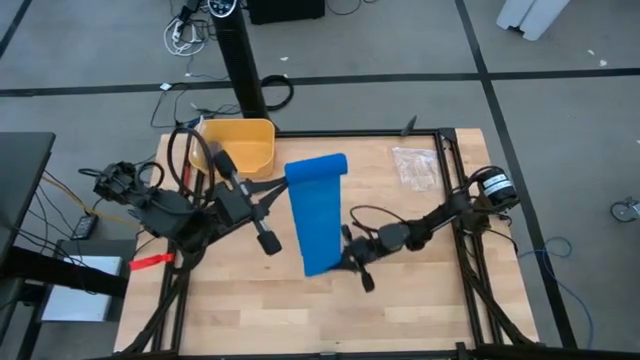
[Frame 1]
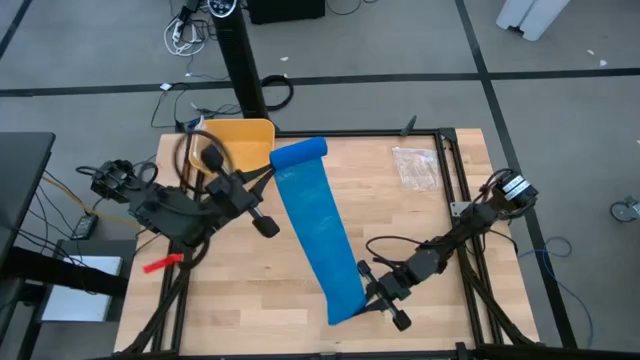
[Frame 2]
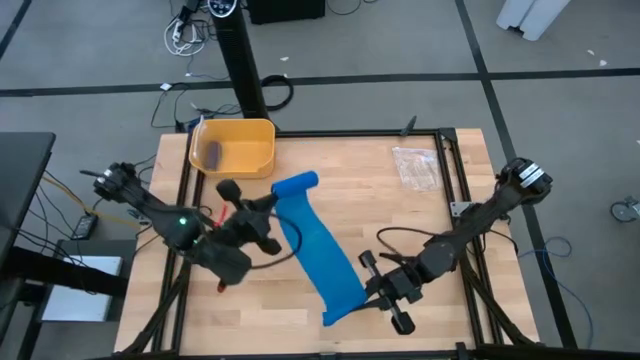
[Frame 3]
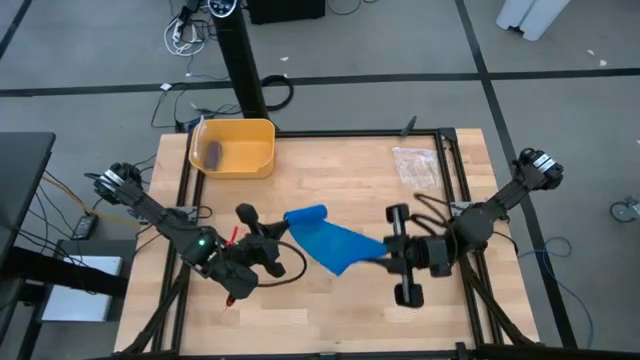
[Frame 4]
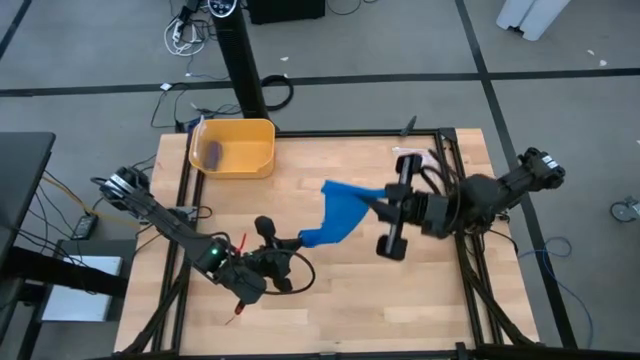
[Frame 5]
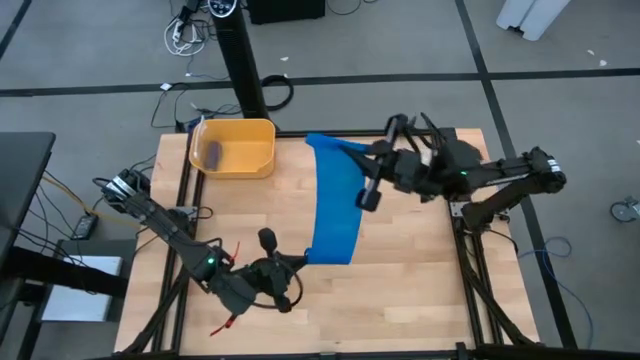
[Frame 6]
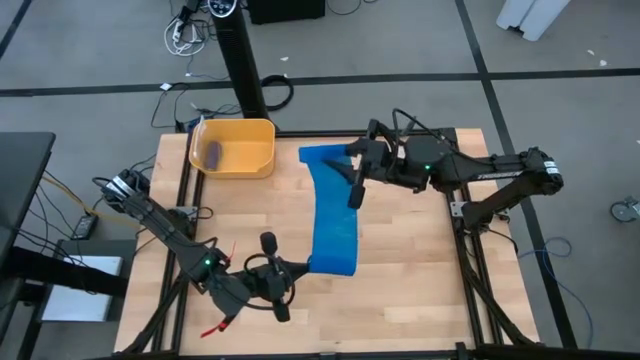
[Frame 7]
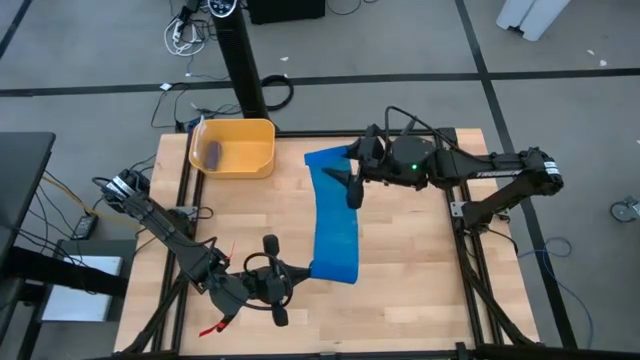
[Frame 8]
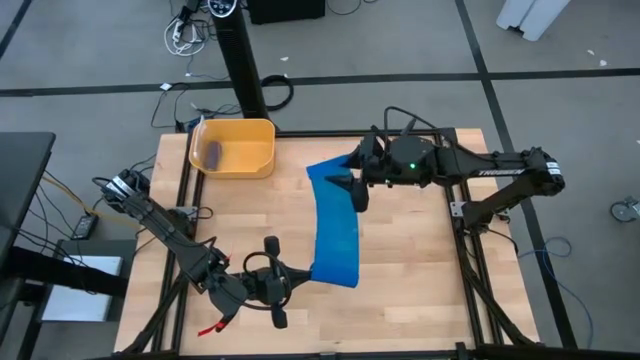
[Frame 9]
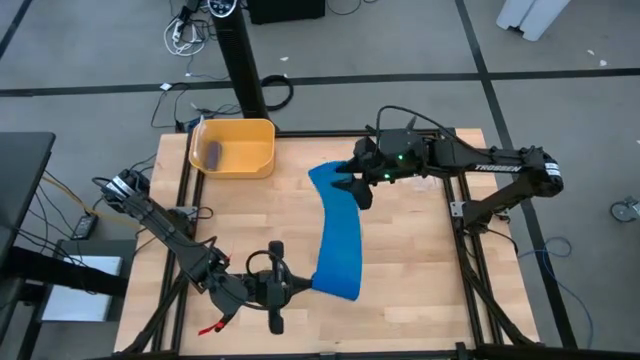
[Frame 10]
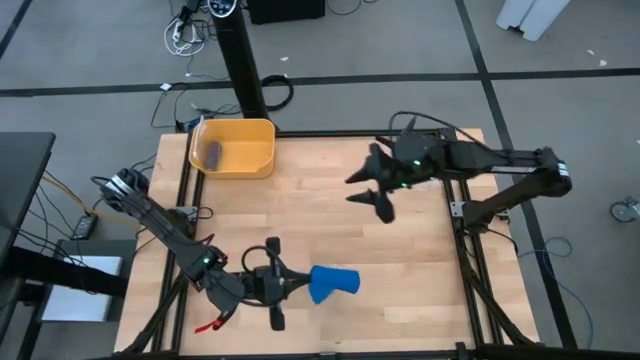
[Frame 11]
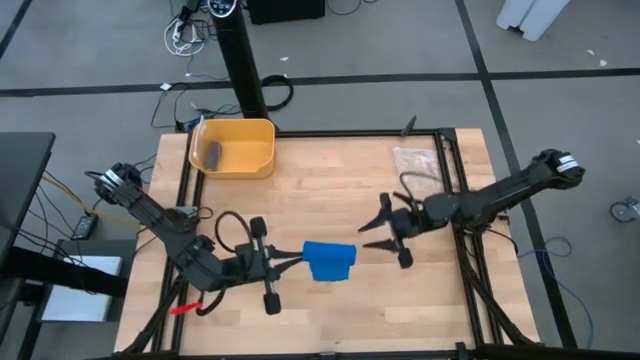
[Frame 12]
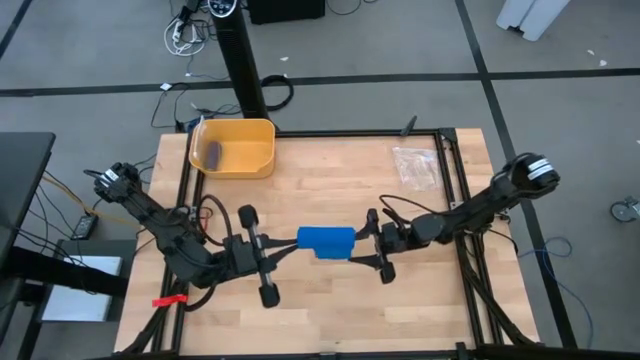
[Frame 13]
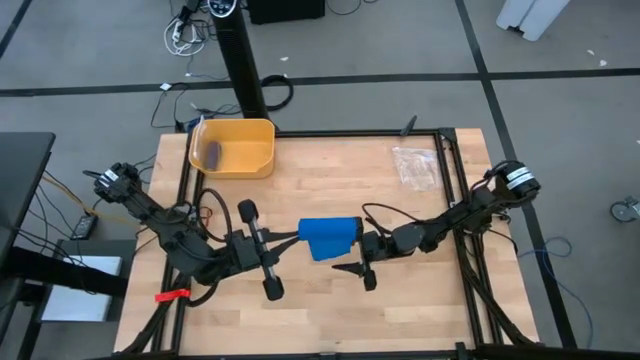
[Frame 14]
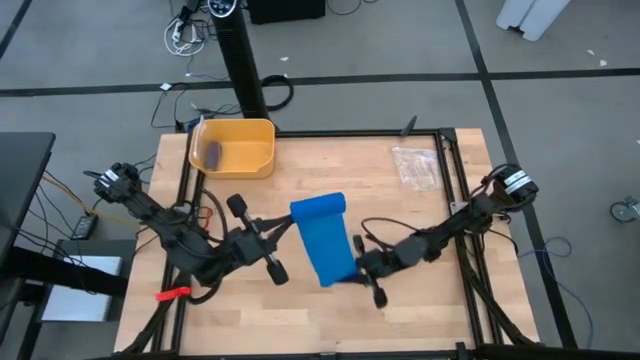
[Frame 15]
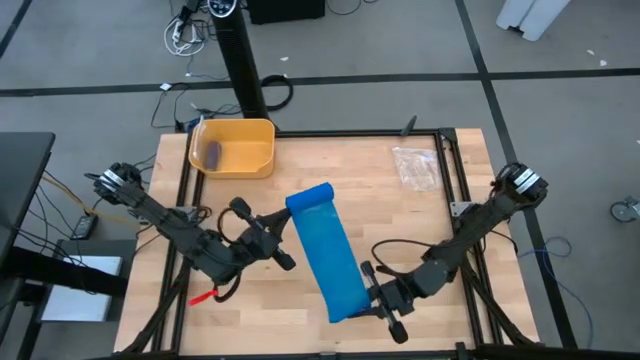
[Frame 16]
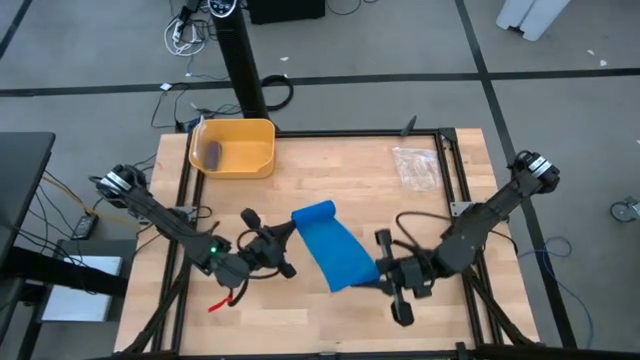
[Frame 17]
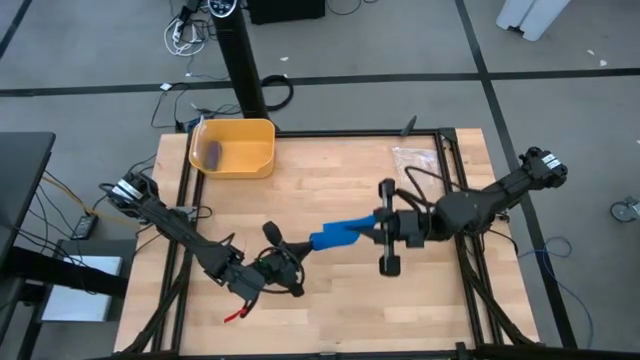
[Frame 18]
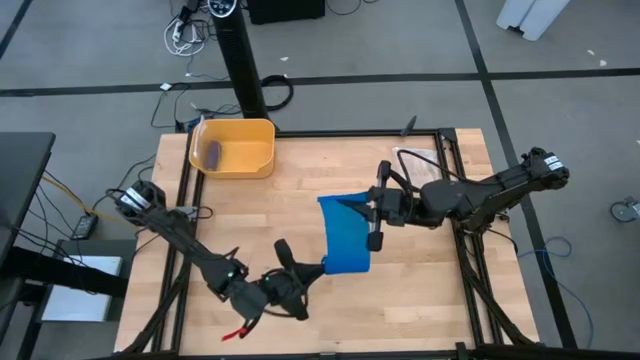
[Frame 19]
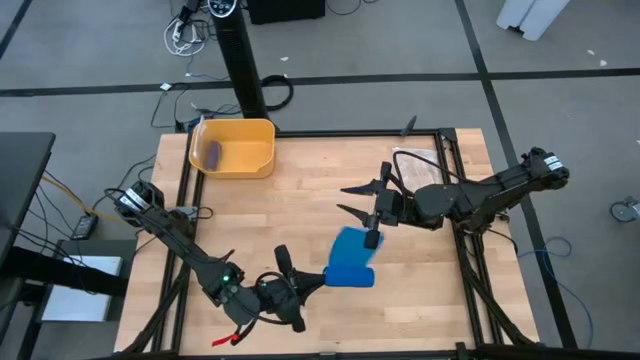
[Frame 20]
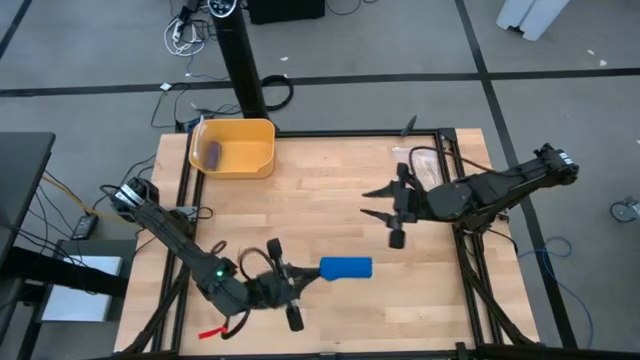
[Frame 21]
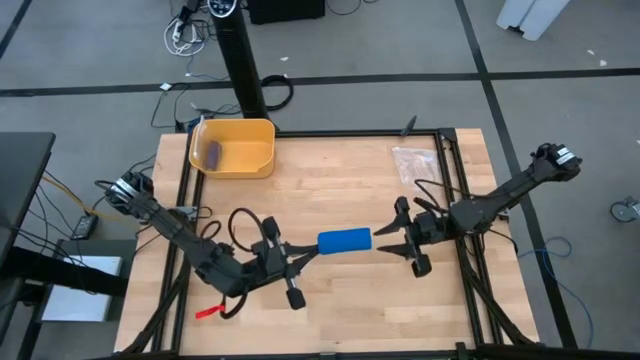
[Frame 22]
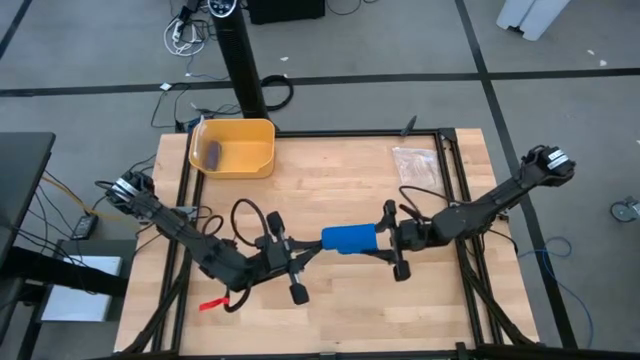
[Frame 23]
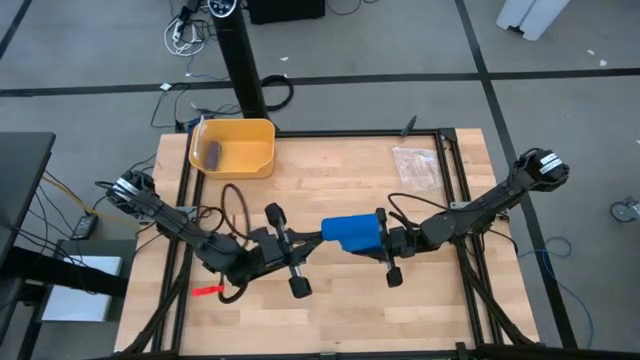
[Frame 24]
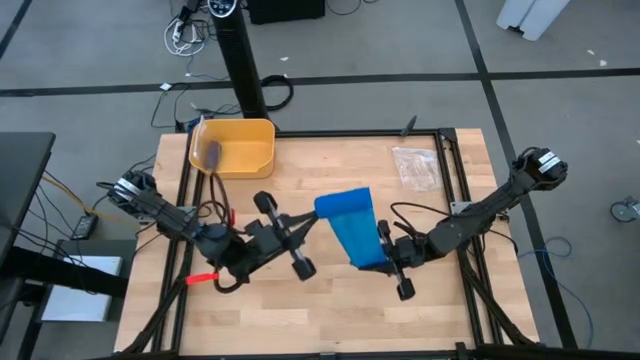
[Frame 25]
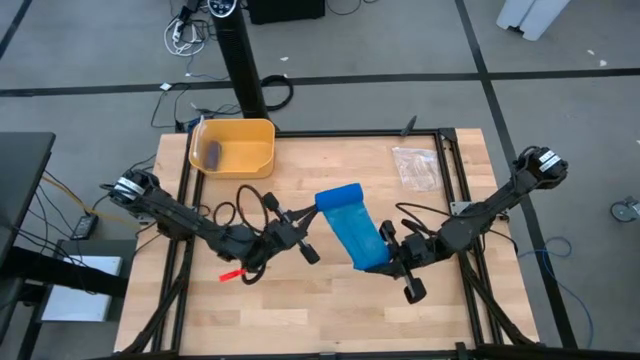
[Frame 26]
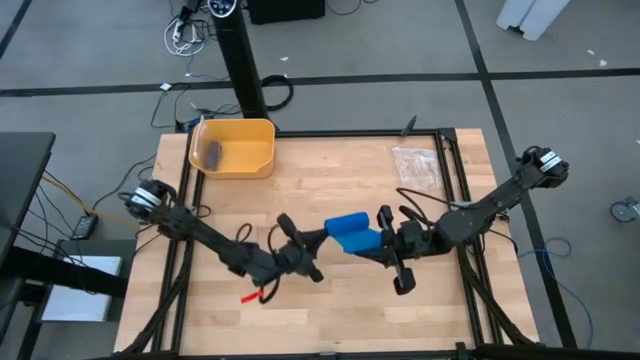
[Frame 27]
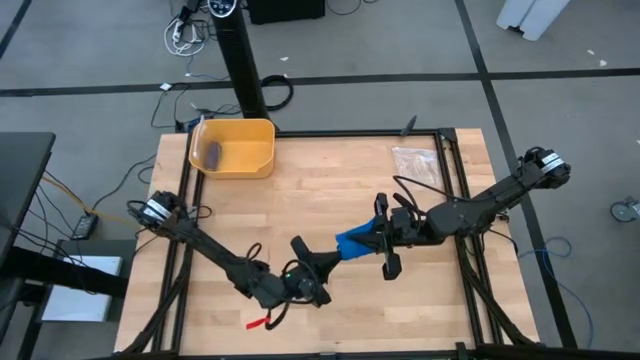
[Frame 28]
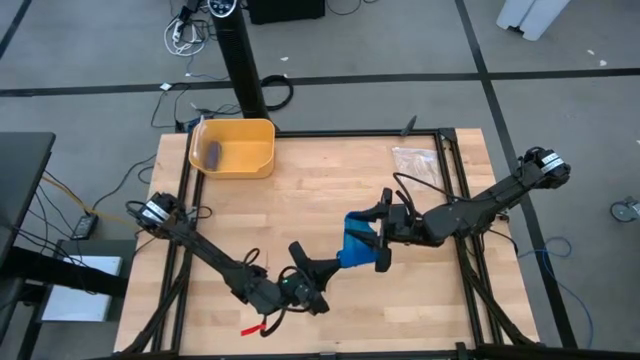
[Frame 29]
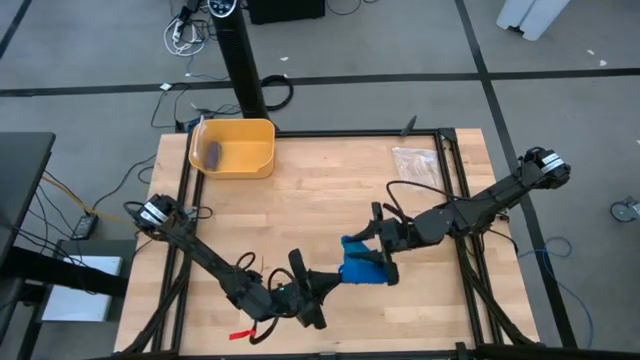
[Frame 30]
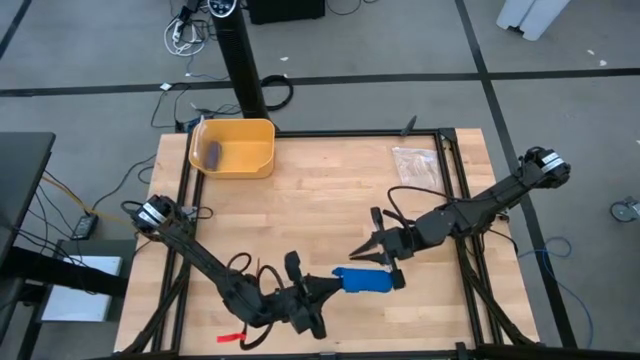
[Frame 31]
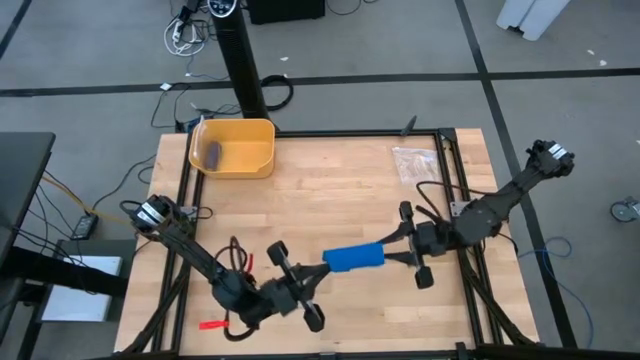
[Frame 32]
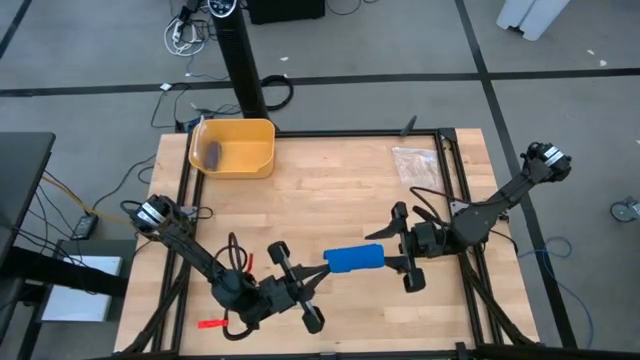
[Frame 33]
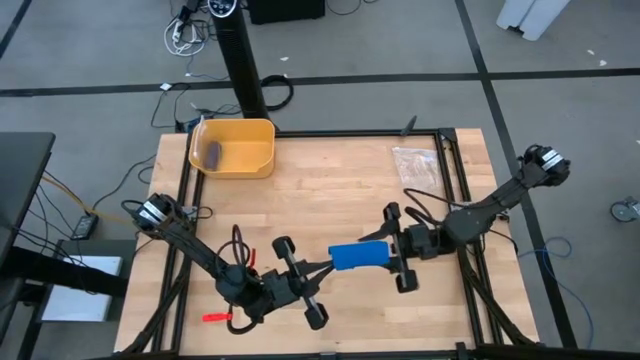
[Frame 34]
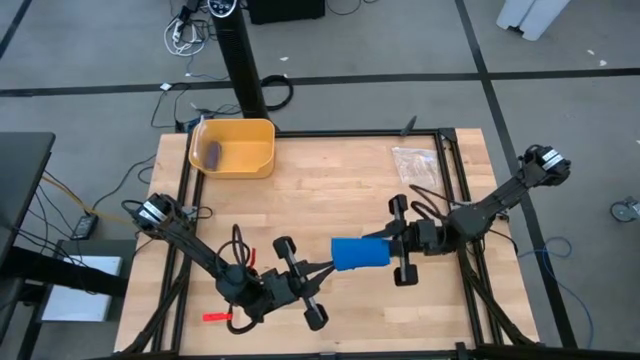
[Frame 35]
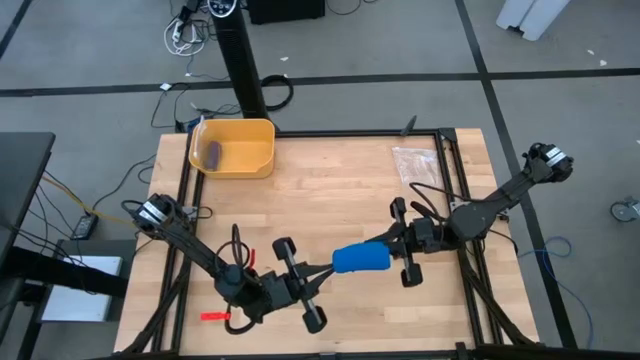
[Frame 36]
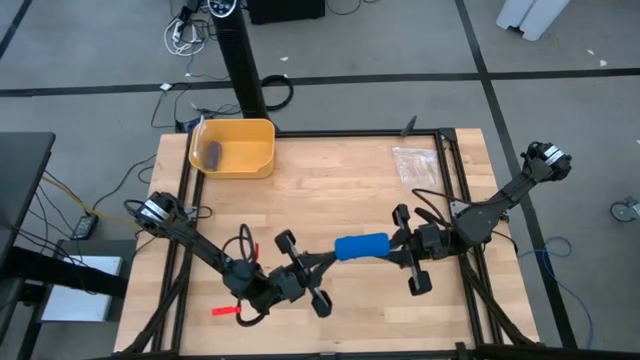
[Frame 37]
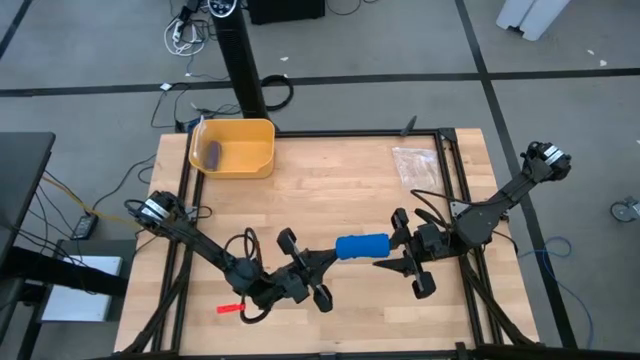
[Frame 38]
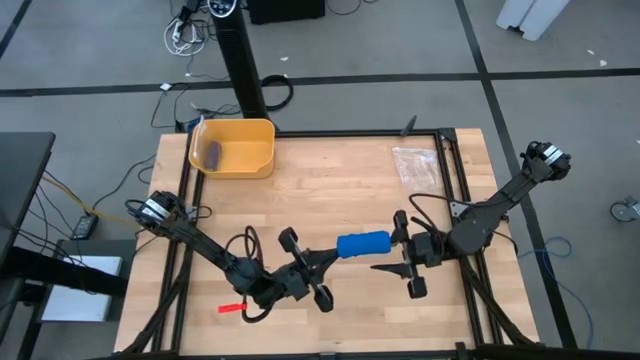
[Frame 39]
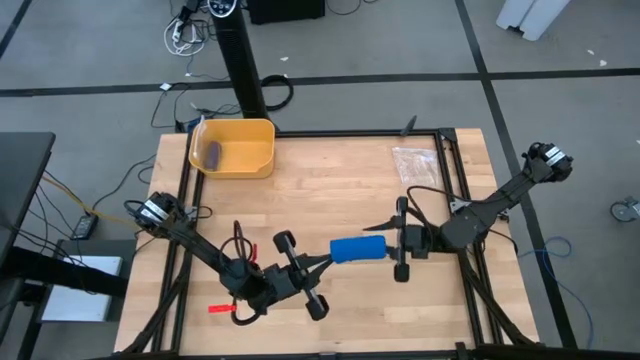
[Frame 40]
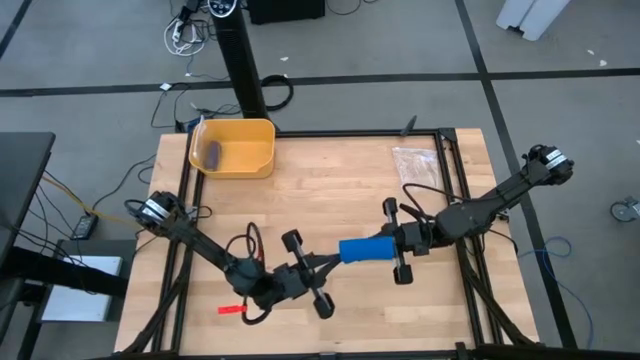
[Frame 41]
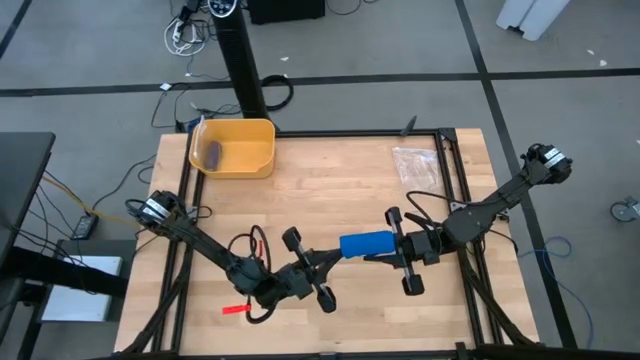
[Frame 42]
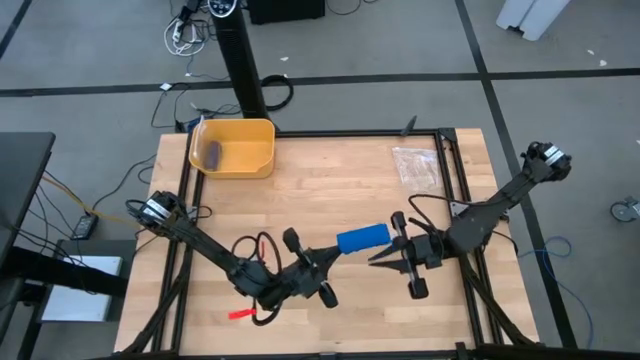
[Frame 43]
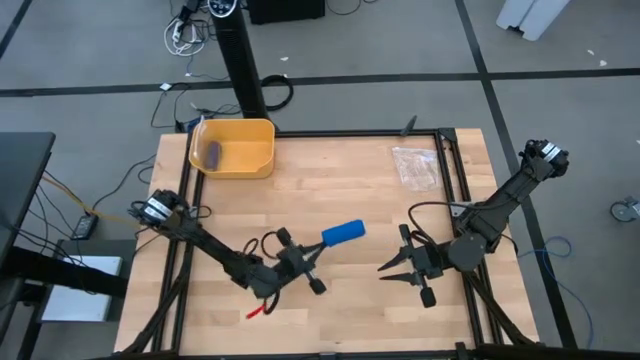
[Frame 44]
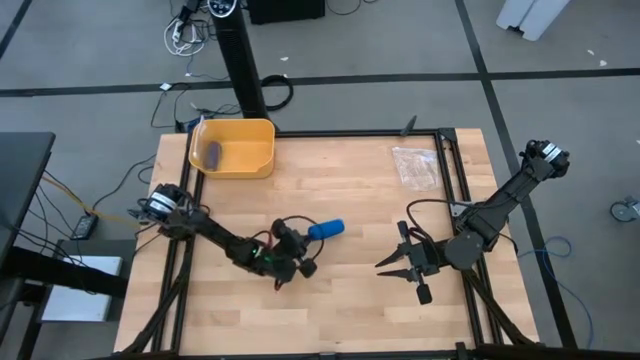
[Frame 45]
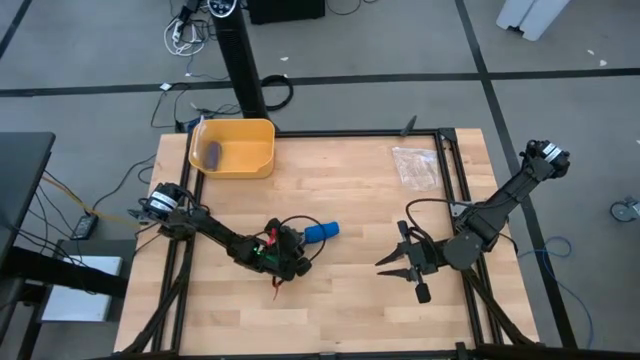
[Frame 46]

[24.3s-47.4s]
Task: Roll bandage
Roll the blue bandage
